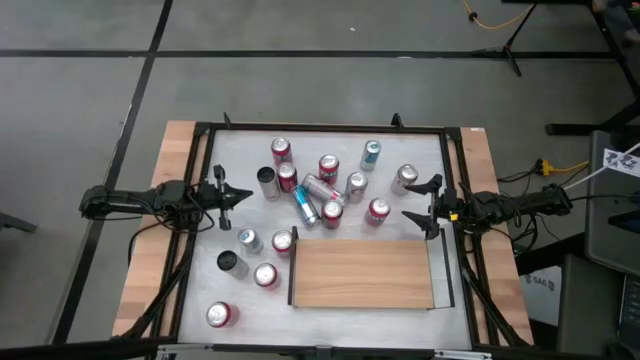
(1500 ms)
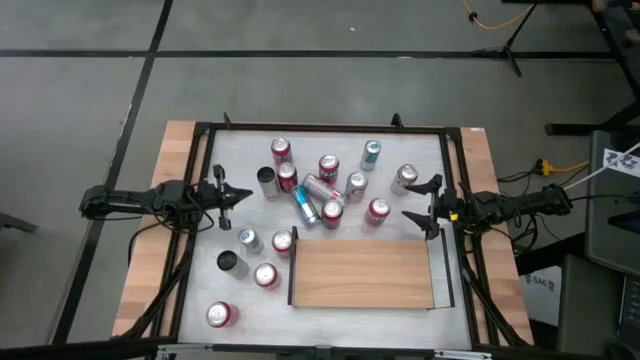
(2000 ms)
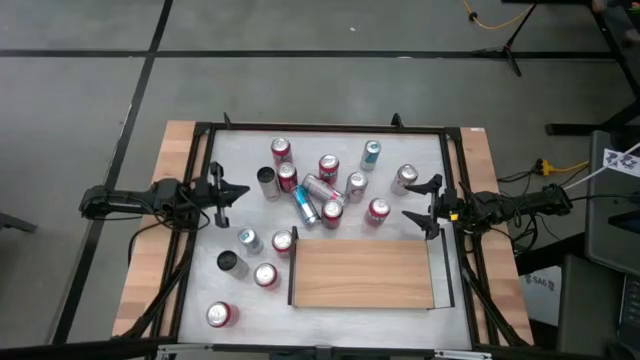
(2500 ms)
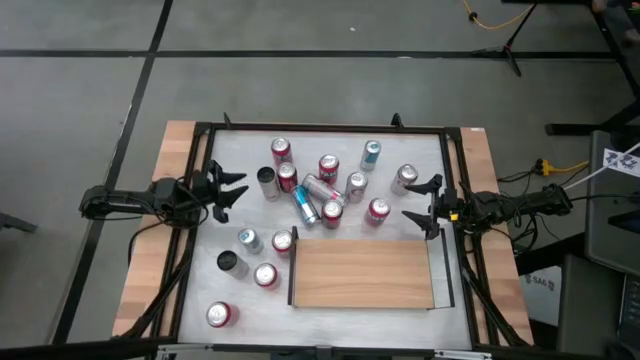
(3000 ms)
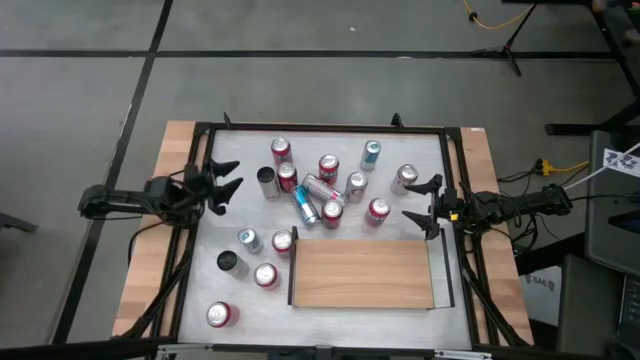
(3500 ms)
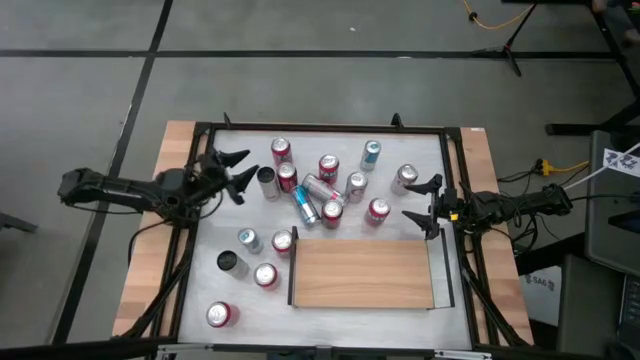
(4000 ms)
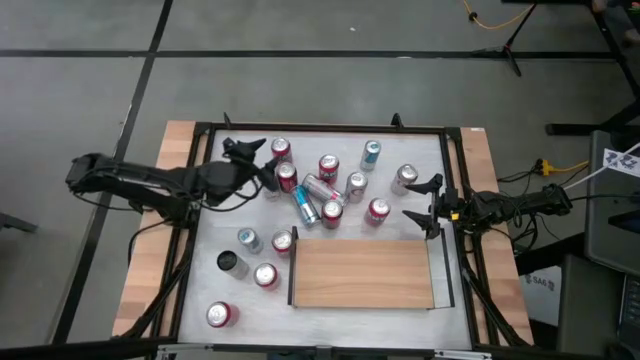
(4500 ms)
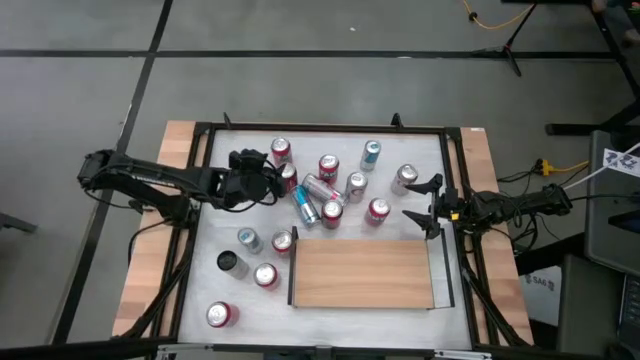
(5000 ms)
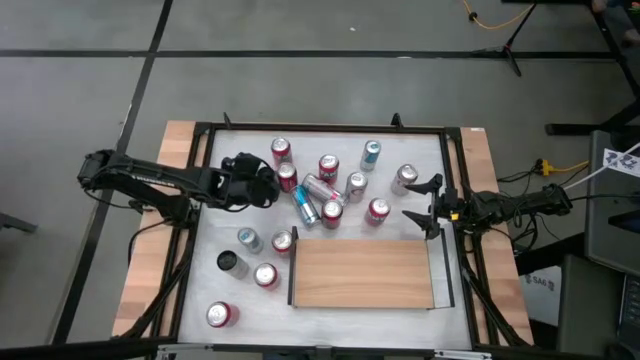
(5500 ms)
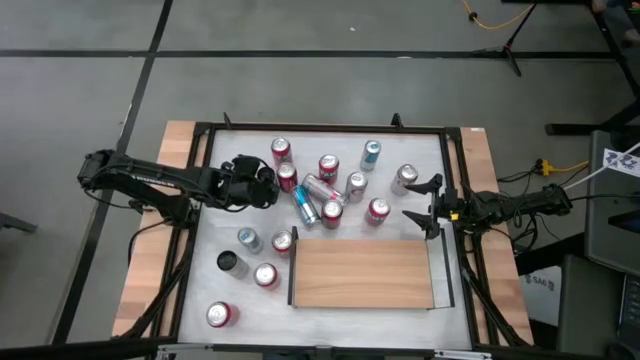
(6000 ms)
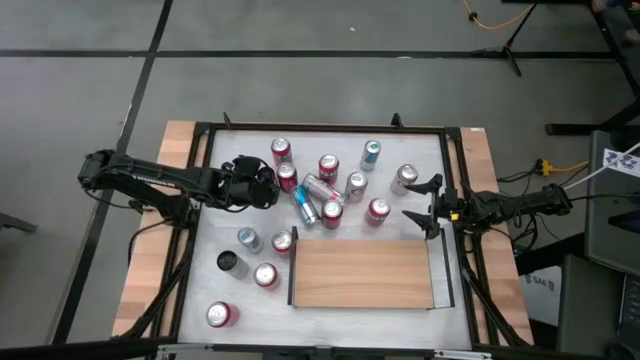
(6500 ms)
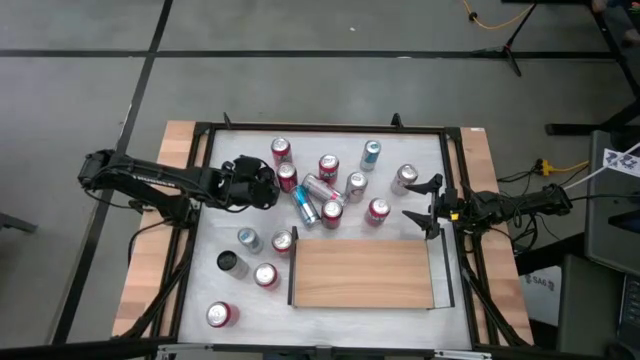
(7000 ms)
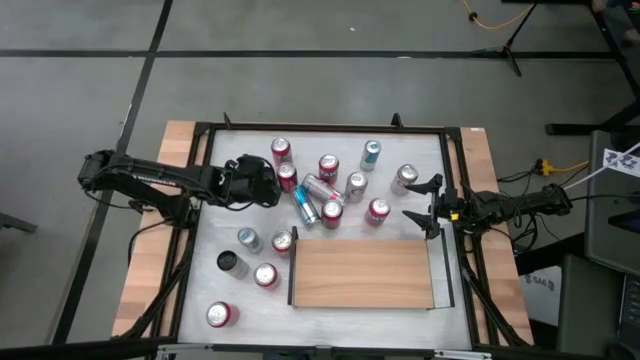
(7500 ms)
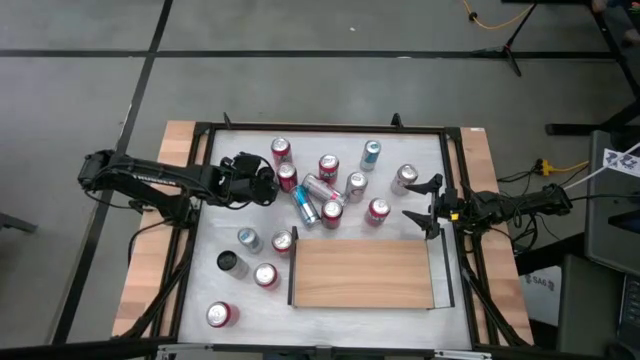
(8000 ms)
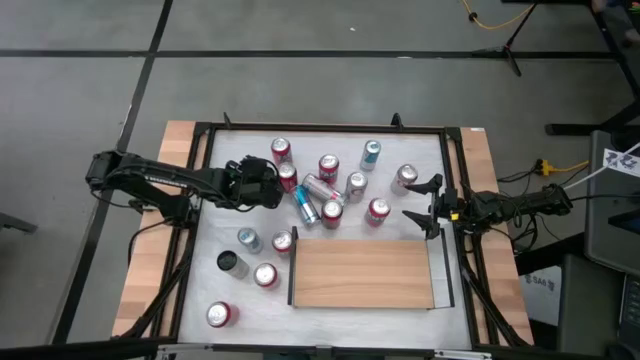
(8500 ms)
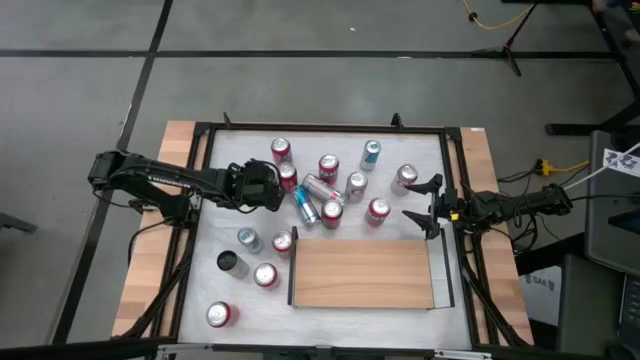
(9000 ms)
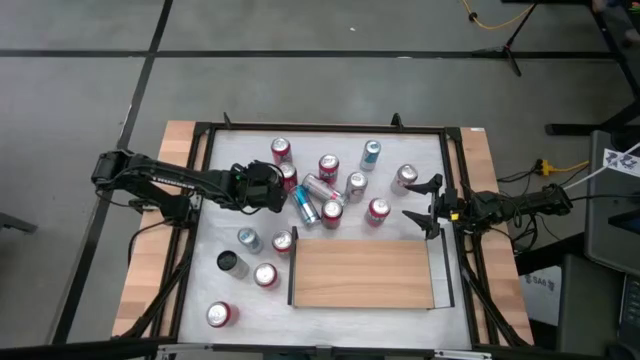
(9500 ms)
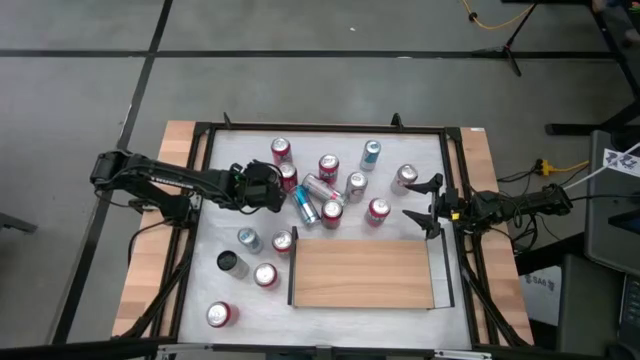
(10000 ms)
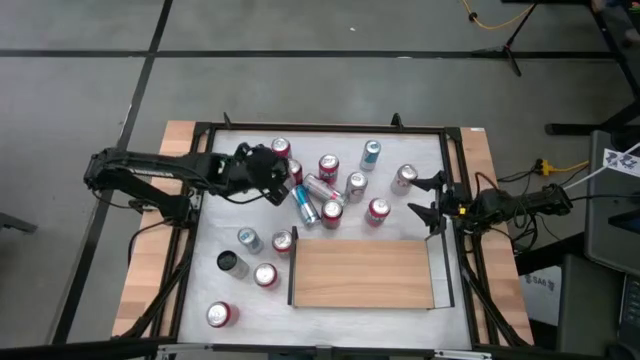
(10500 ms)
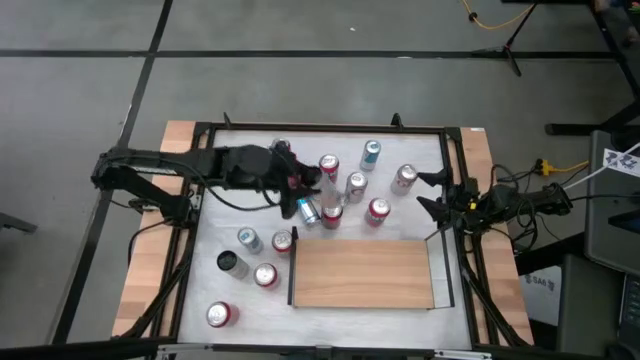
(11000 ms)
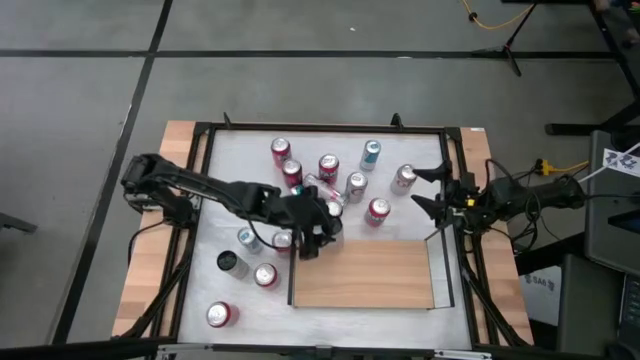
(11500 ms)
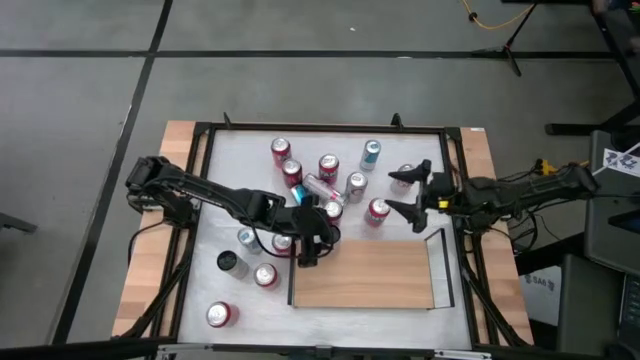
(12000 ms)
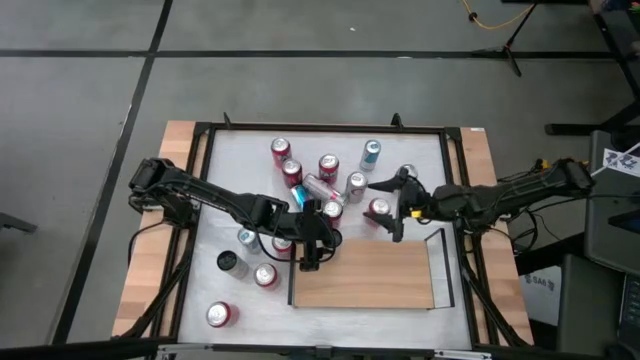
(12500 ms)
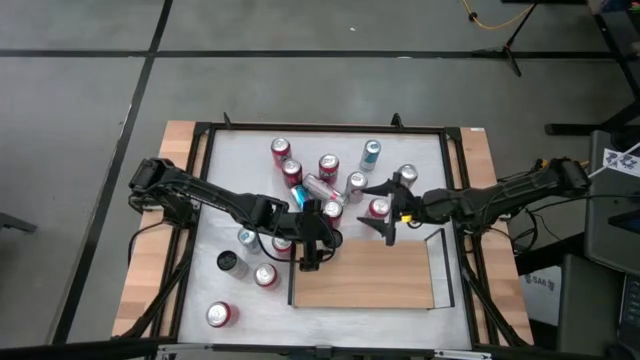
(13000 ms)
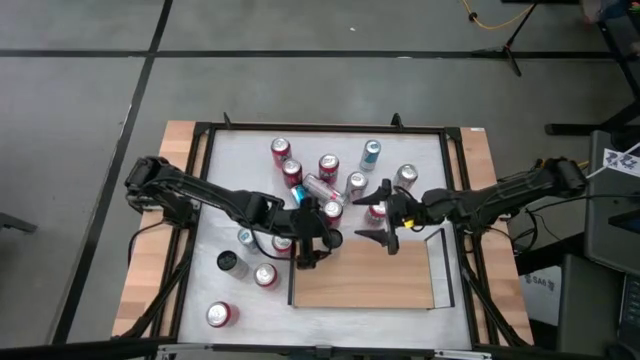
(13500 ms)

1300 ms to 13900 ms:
Task: Place canned beverage on shelf
Put the top black soda can on the shelf

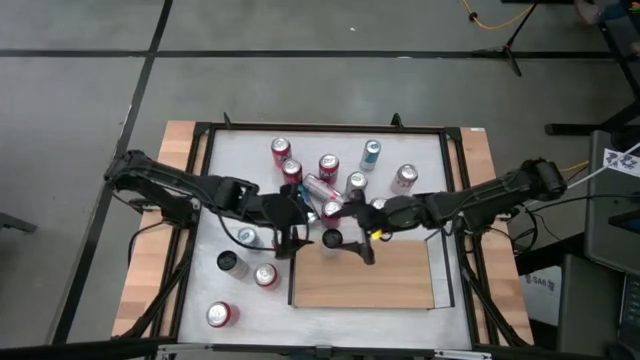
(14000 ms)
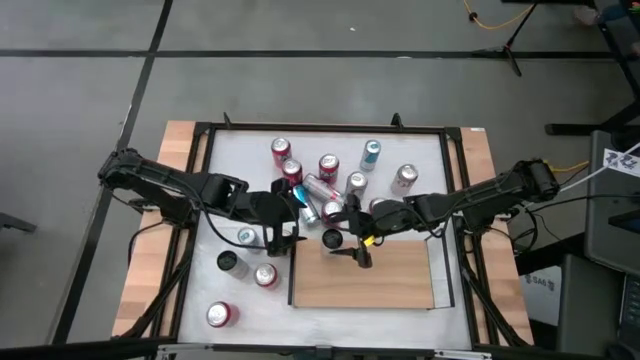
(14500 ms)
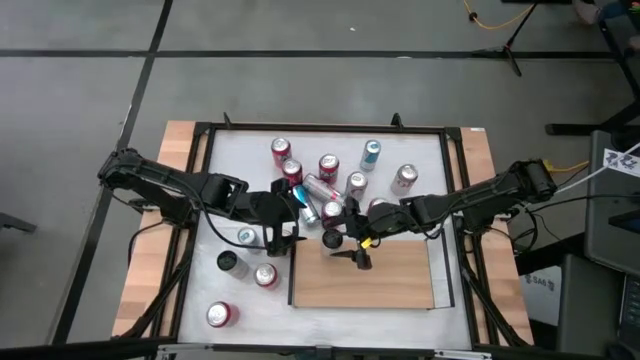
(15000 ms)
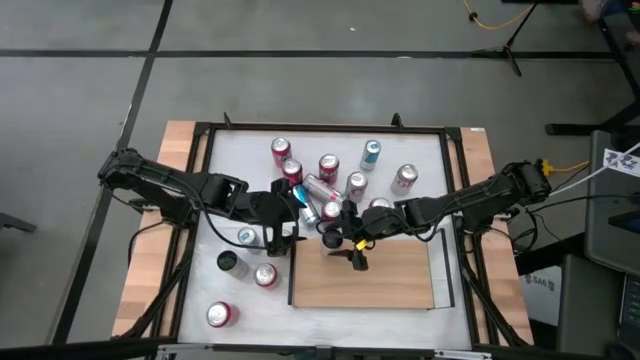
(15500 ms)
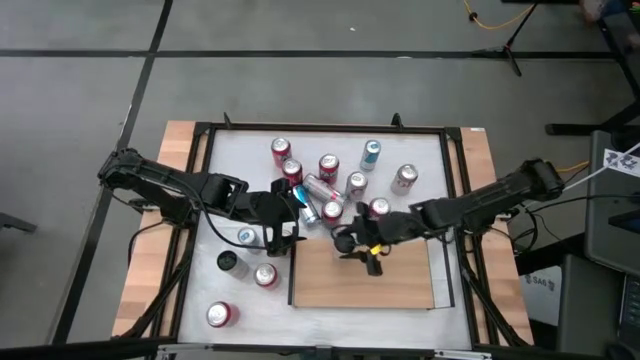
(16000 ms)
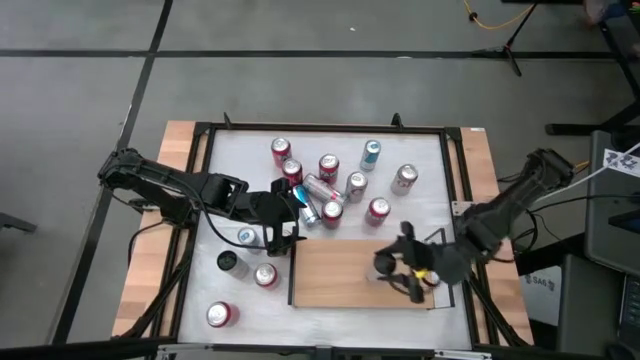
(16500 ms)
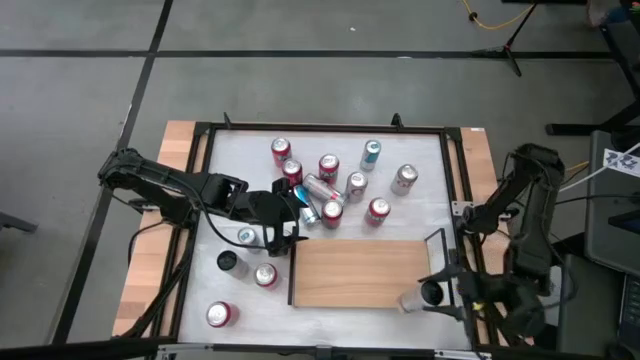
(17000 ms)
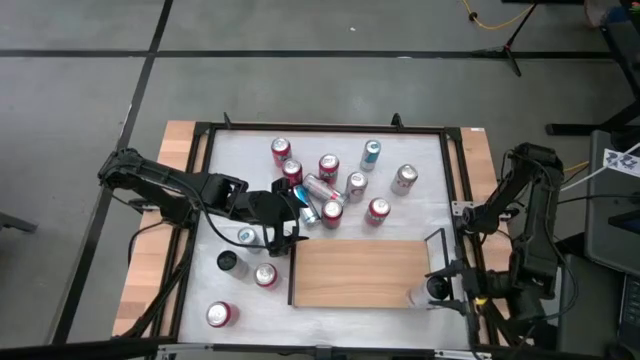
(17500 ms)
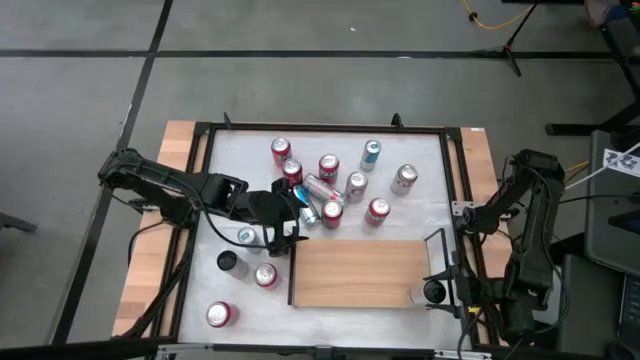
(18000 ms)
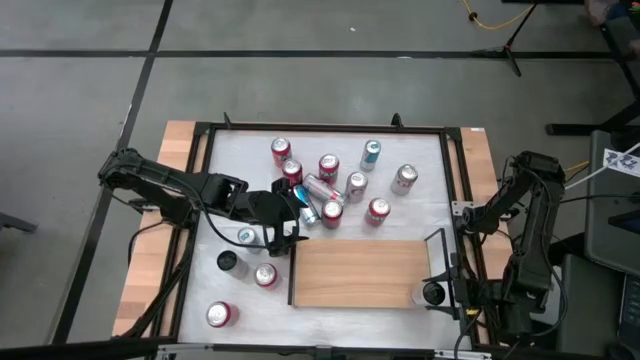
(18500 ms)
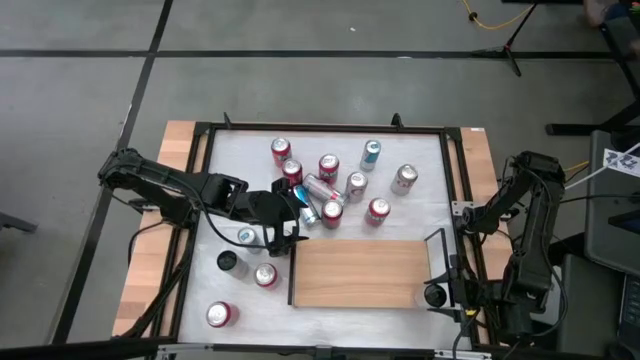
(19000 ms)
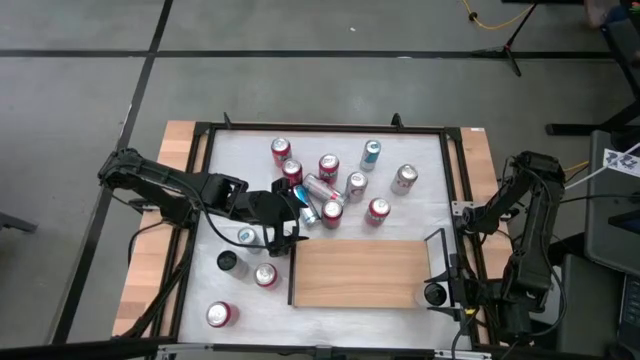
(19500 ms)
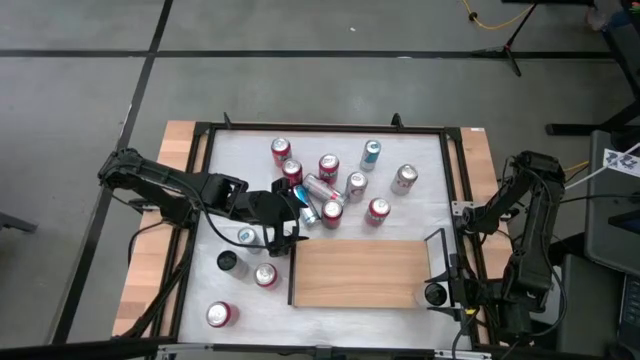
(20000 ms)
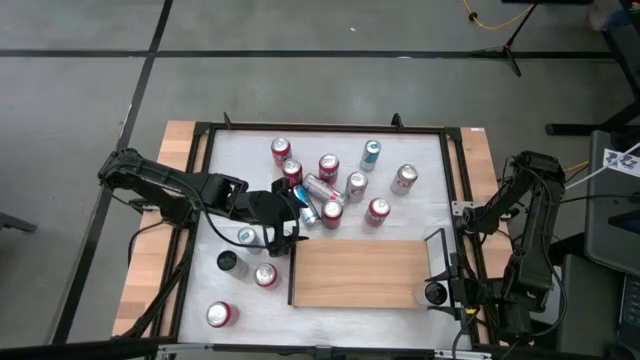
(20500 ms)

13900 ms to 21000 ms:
Move the black soda can on the shelf

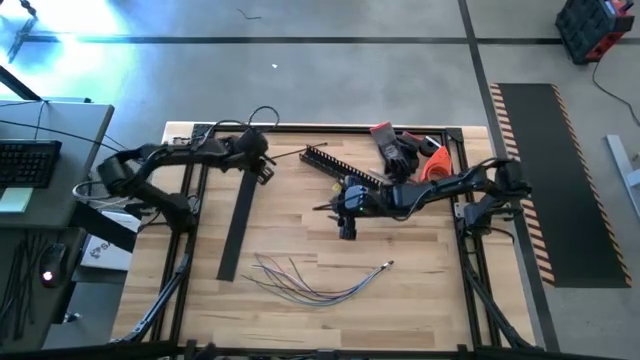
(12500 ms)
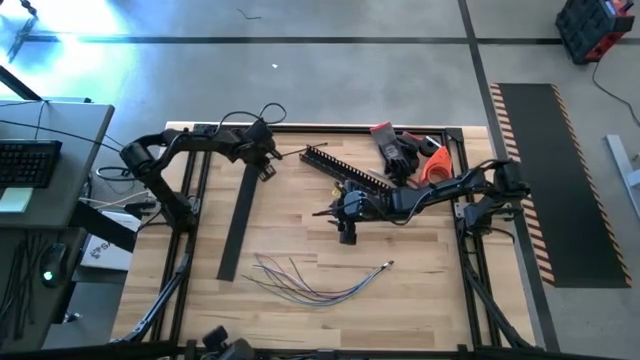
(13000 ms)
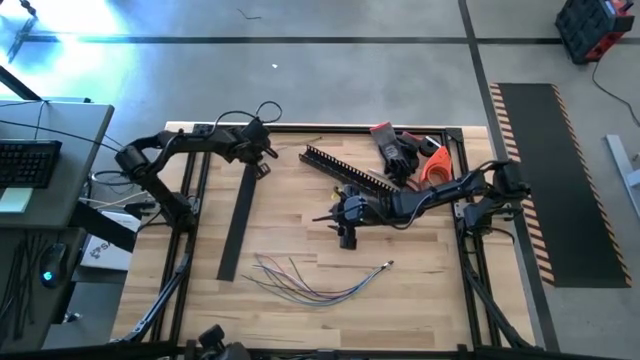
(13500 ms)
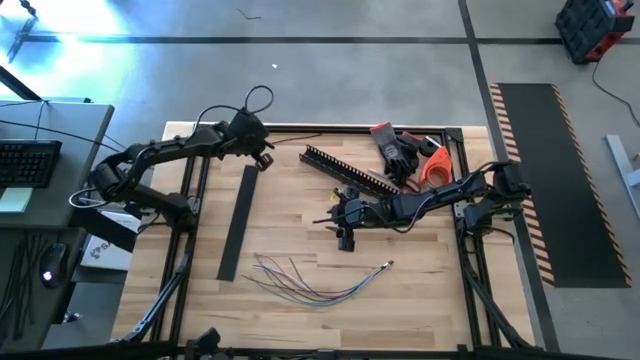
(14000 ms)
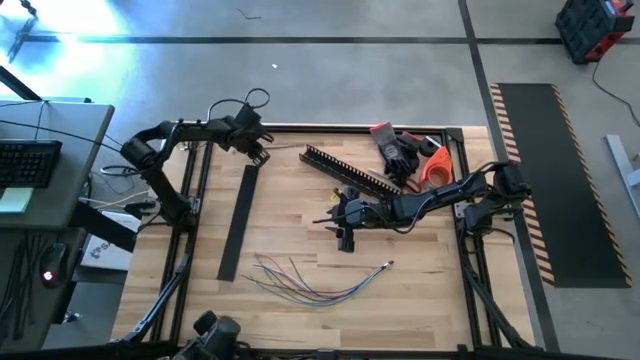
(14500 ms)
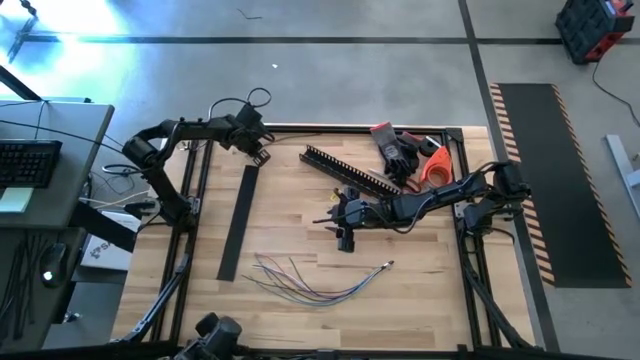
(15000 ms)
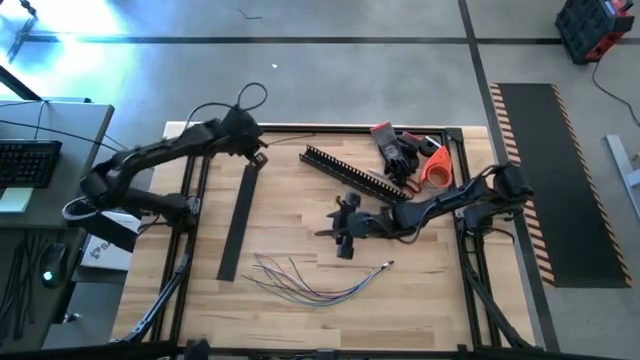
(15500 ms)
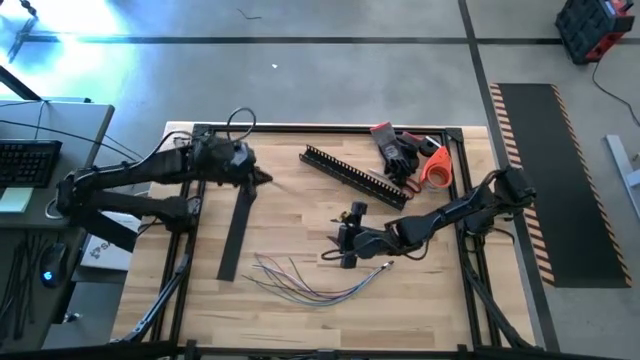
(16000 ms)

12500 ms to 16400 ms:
Task: Ziptie cables
Wrap the black zip tie on the cables
